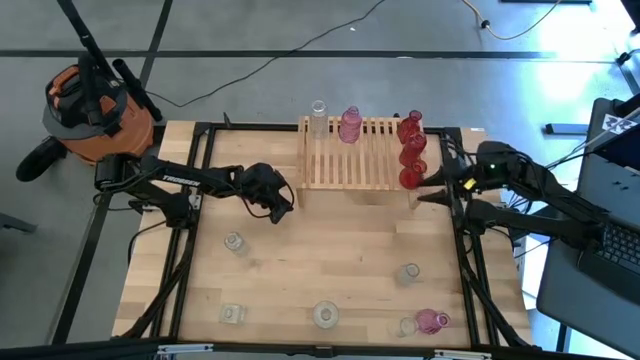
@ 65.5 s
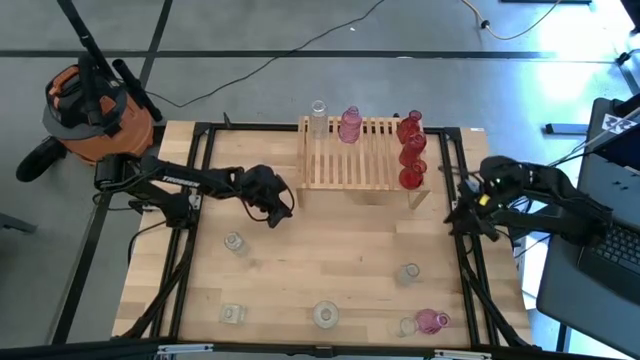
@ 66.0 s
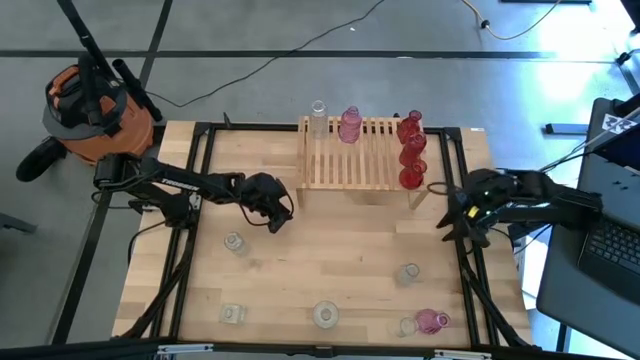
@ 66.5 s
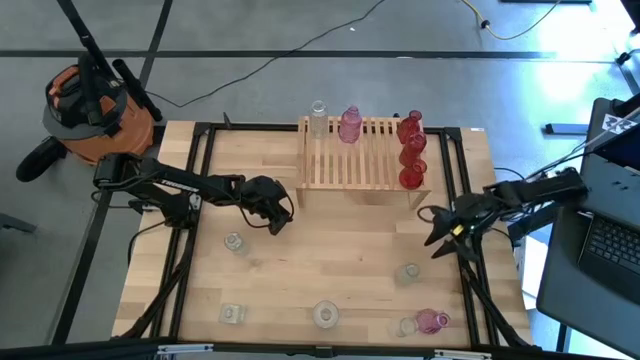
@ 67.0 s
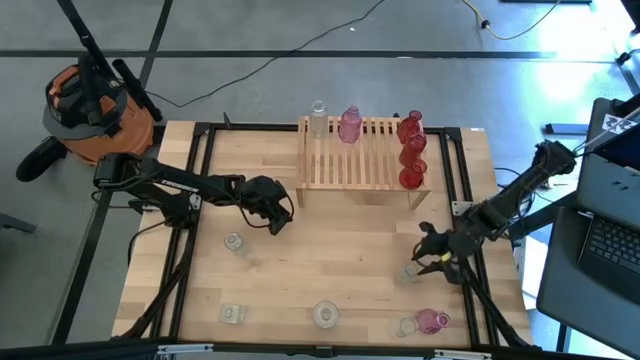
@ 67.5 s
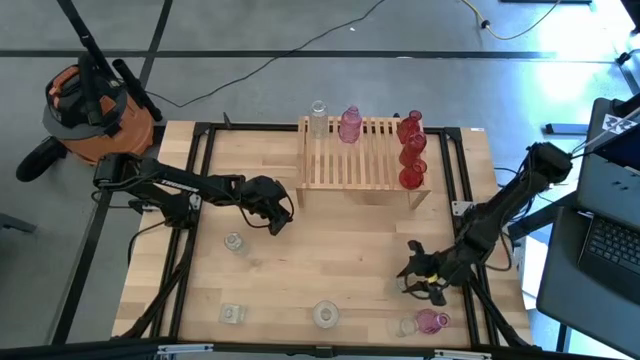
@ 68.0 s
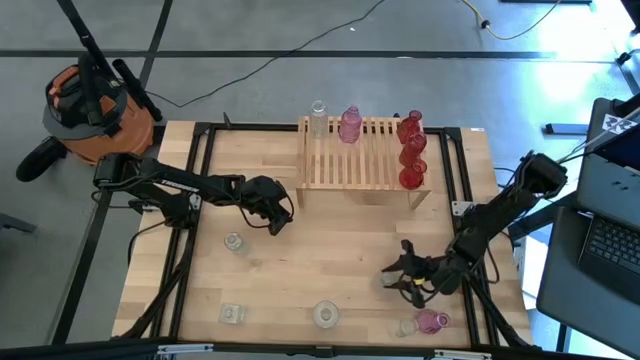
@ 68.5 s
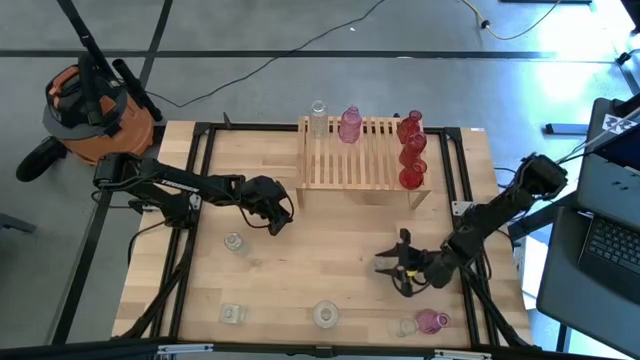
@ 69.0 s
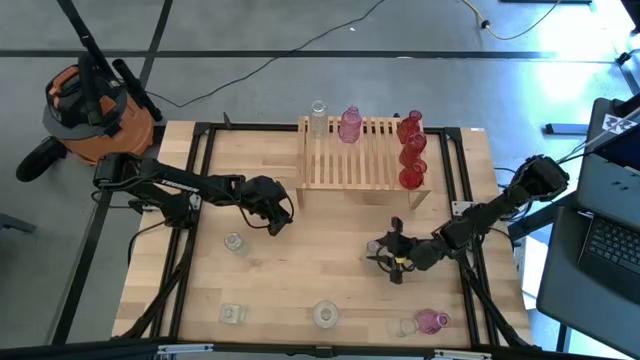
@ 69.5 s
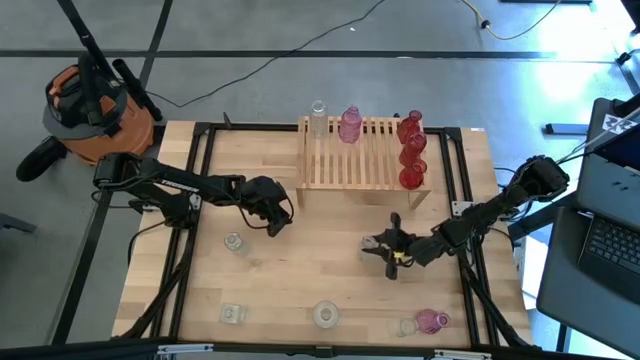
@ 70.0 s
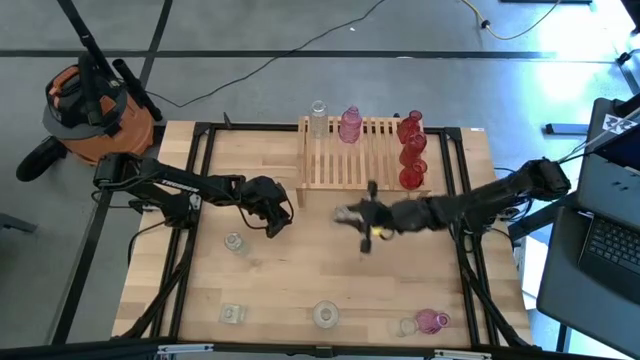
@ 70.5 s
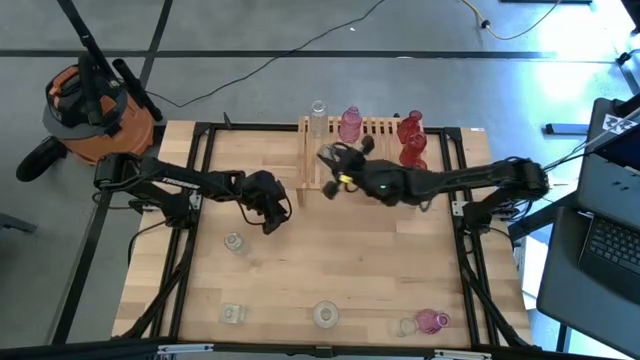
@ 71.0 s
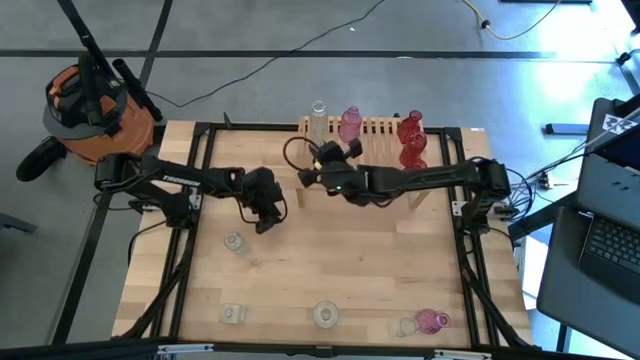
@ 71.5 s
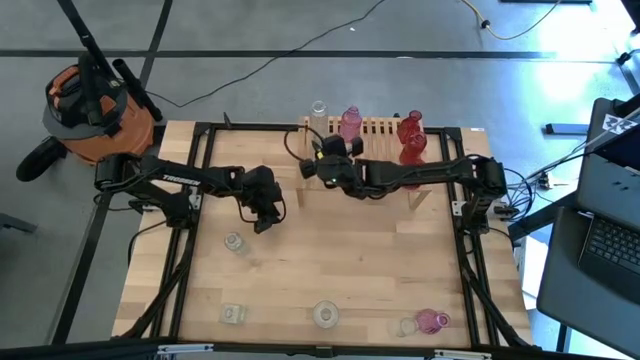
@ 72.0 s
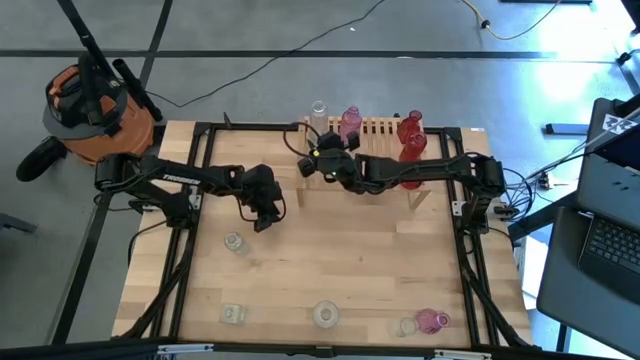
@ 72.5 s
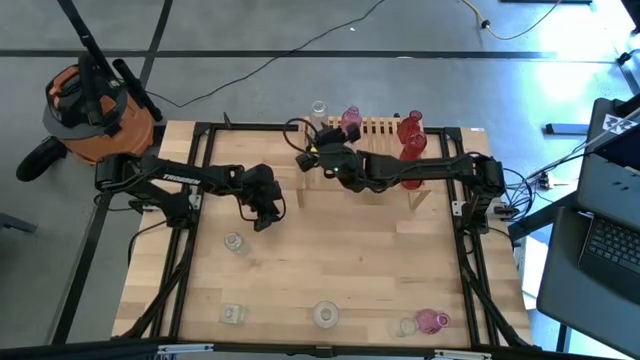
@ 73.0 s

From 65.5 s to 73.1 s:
Task: sort vases onto shelf
Put the transparent vase on the shelf aligned with the other transparent vase

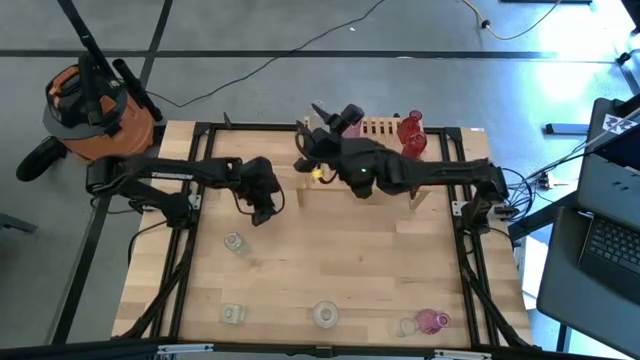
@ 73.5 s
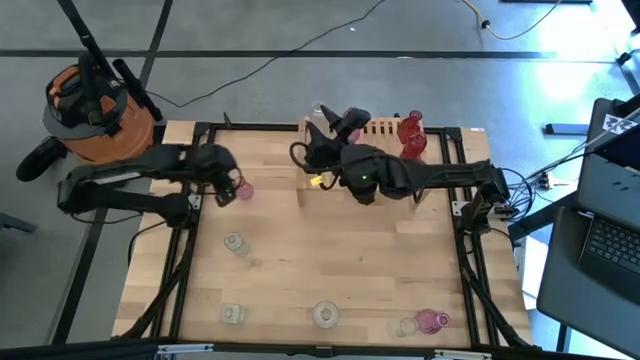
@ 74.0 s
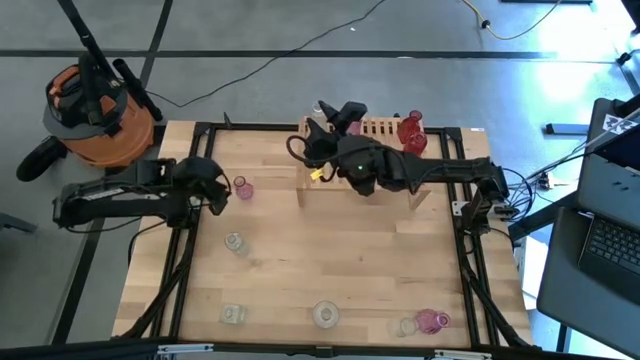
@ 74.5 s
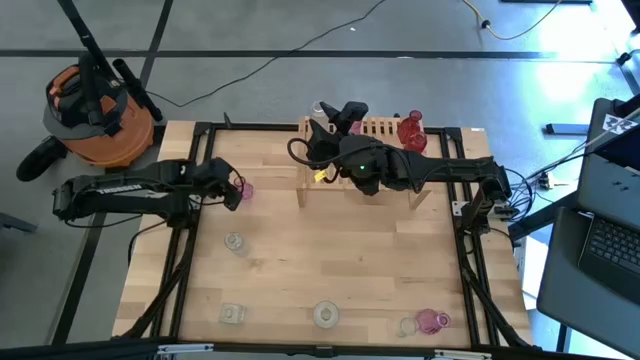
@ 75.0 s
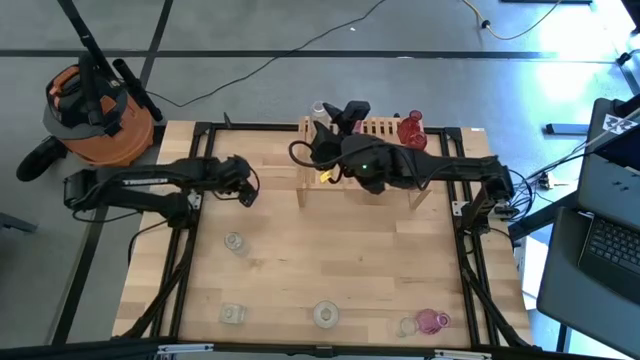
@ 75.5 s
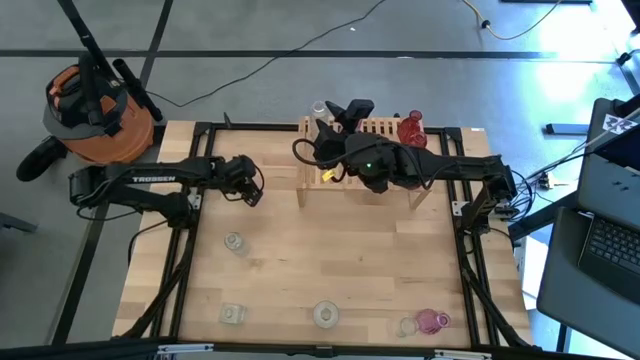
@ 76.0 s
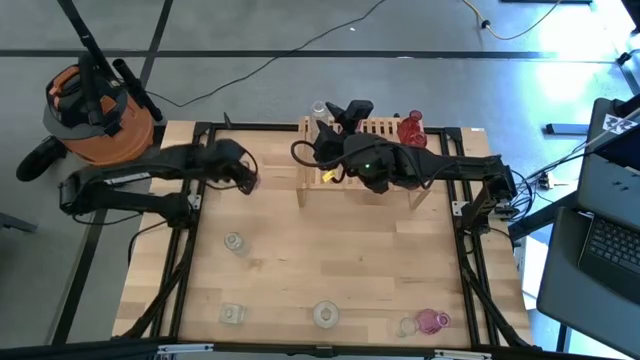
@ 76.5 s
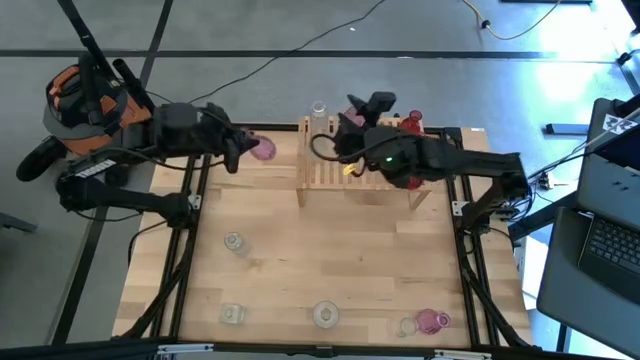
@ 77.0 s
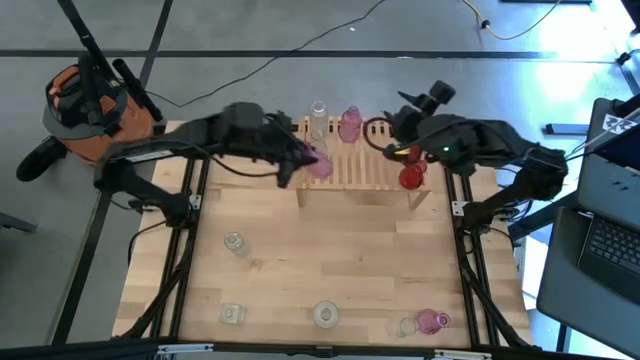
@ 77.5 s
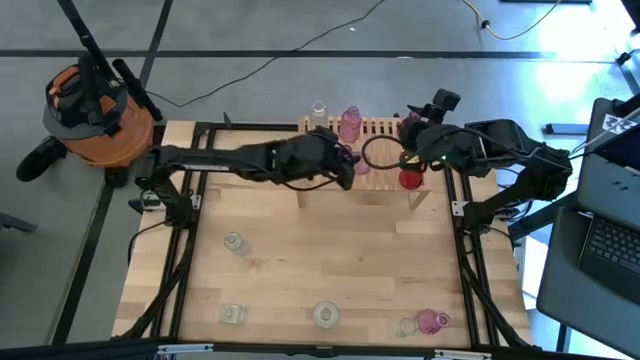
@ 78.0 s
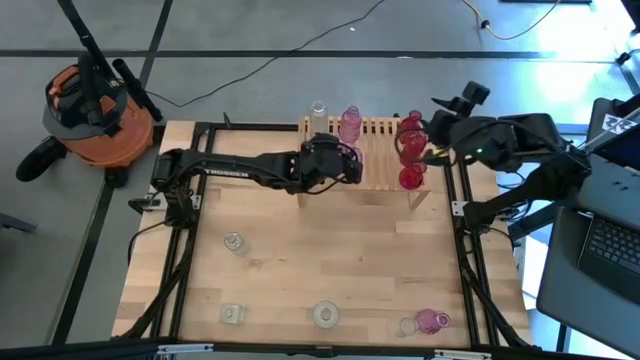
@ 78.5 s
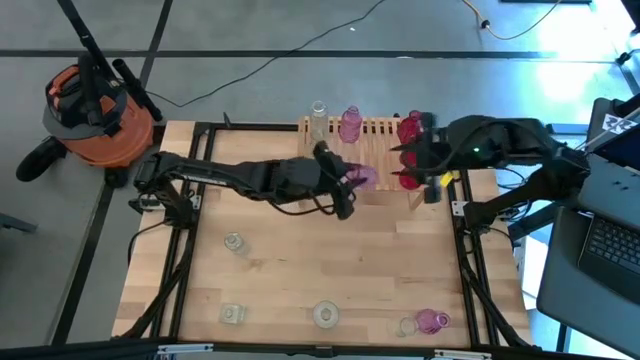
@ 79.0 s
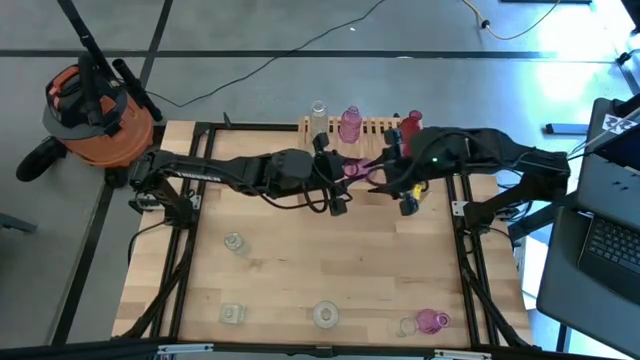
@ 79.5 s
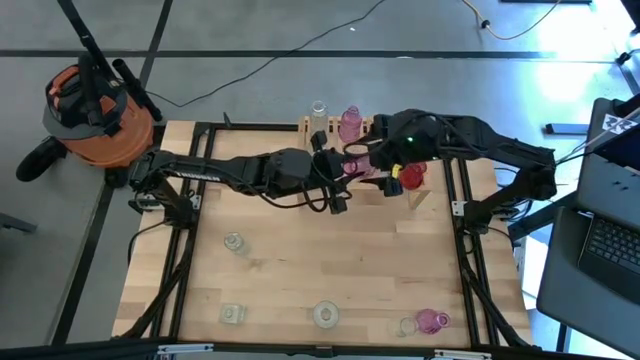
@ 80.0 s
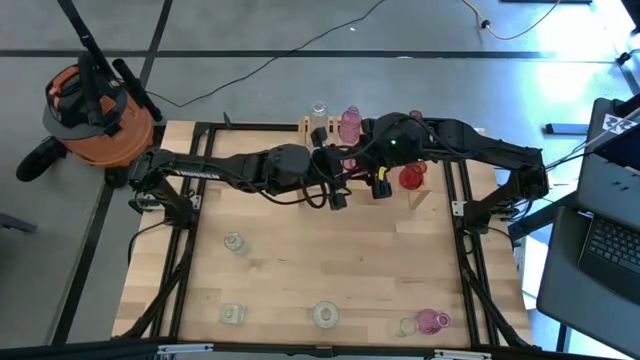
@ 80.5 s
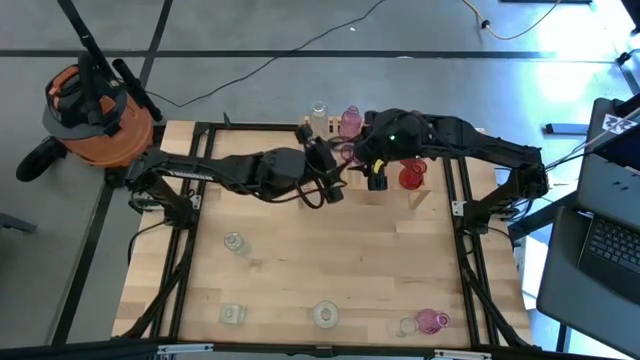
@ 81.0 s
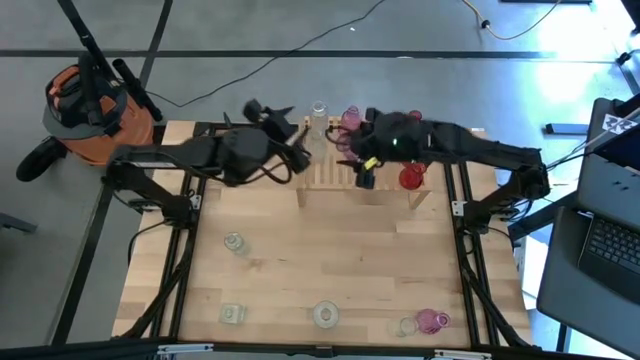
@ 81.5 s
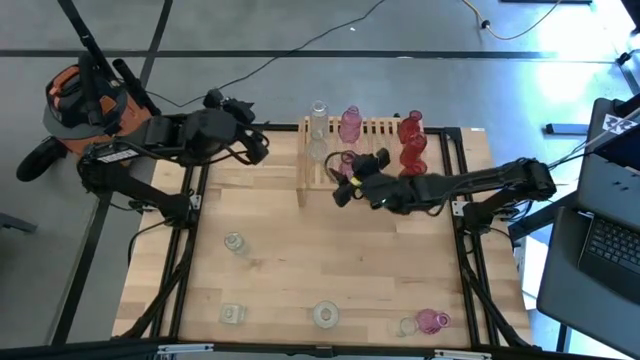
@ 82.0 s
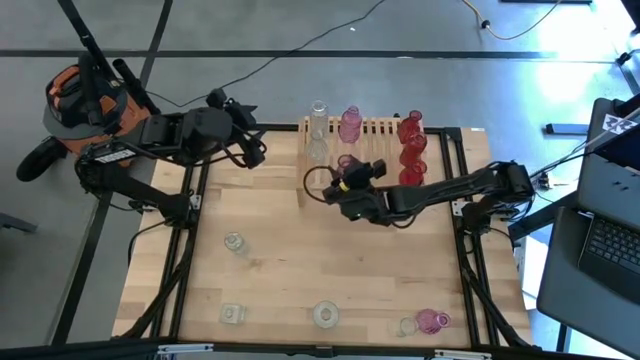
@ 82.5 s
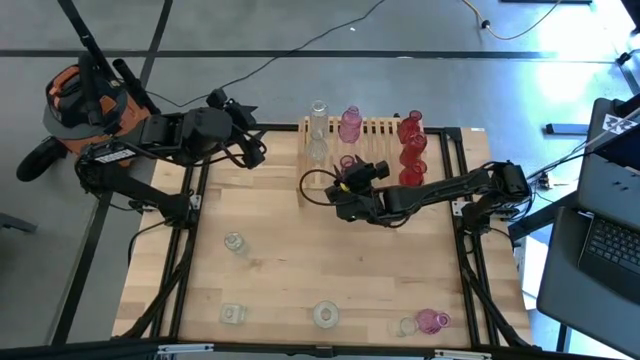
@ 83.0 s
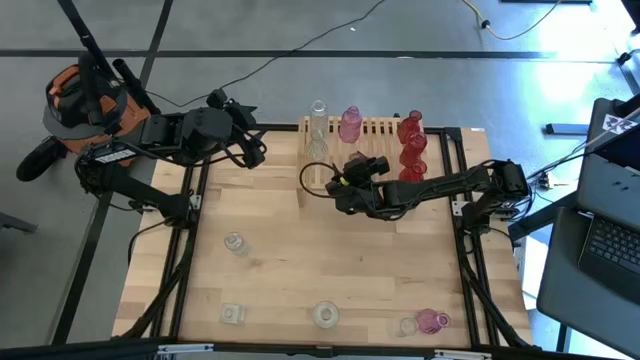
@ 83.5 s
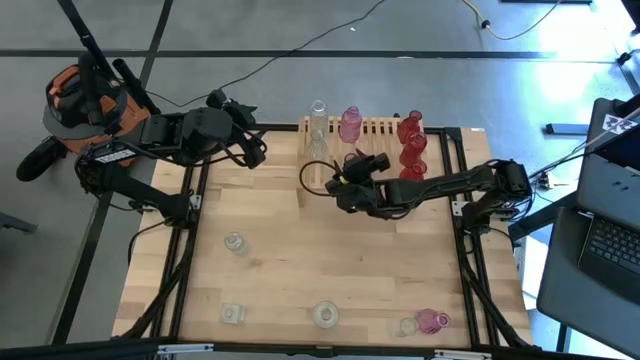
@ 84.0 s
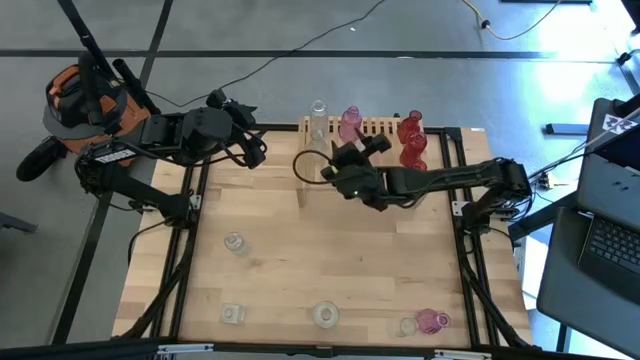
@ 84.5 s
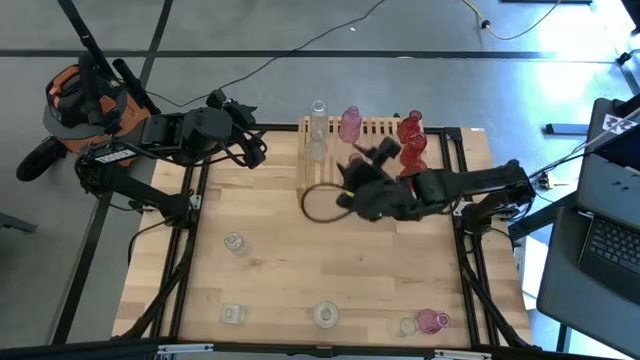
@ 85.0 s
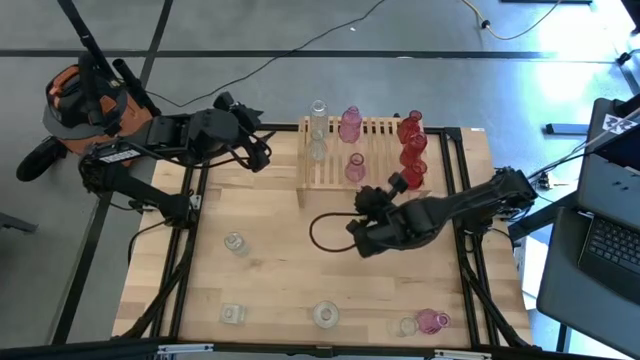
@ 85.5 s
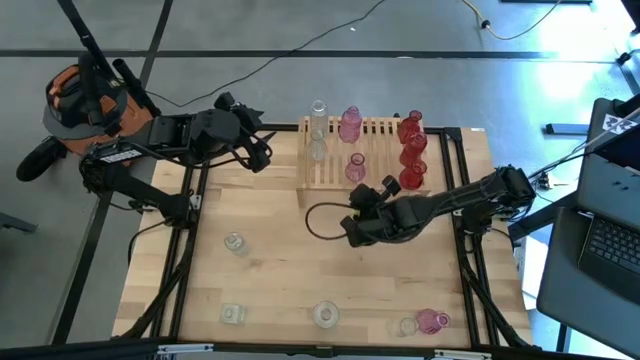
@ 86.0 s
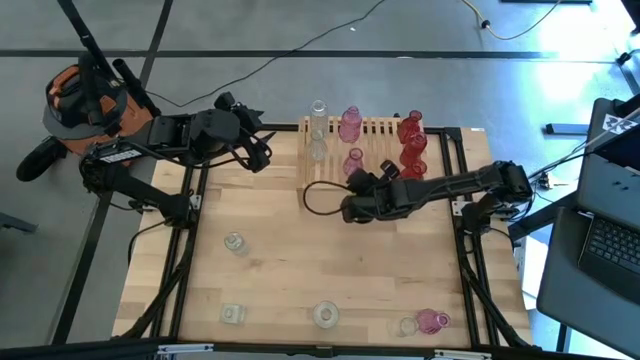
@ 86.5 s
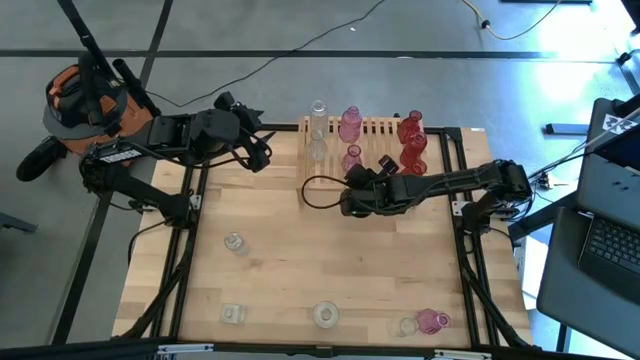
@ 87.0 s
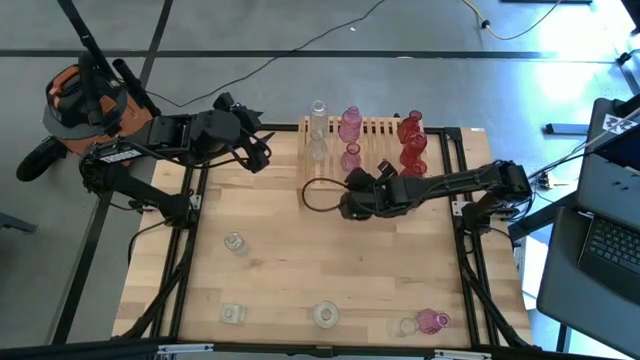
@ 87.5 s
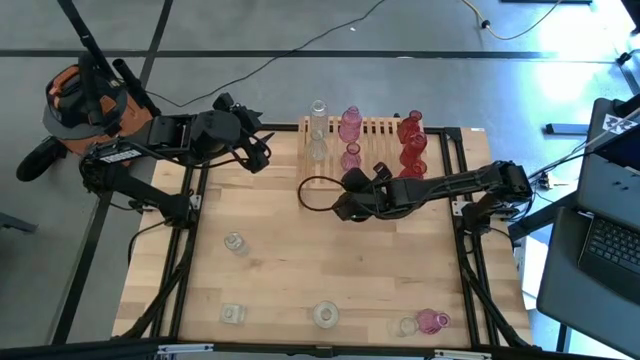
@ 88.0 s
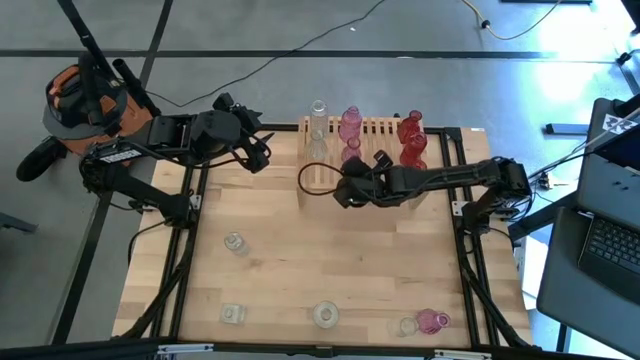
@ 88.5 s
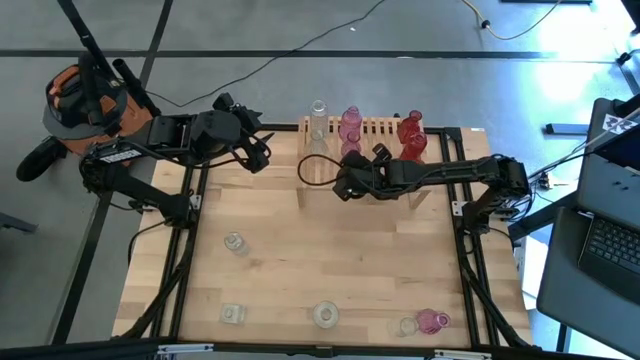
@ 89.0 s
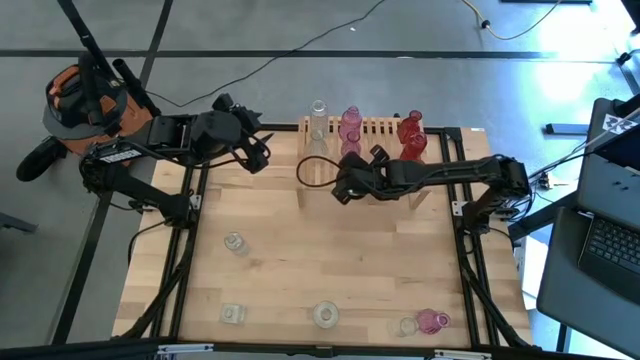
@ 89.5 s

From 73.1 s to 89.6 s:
Put the top pink vase on the shelf aligned with the other pink vase
